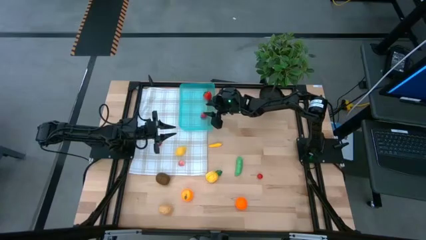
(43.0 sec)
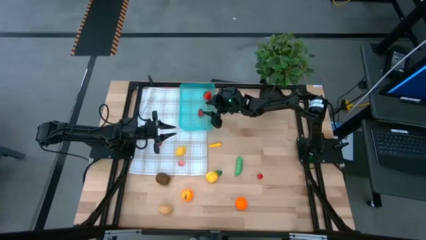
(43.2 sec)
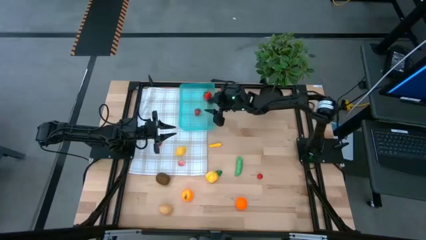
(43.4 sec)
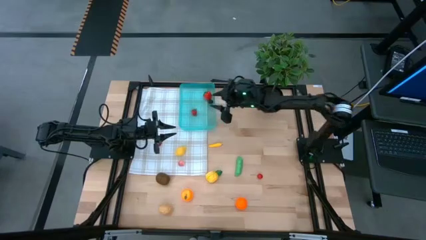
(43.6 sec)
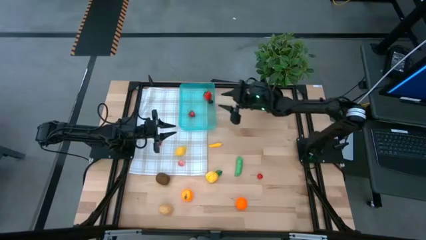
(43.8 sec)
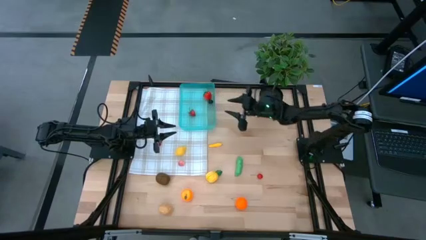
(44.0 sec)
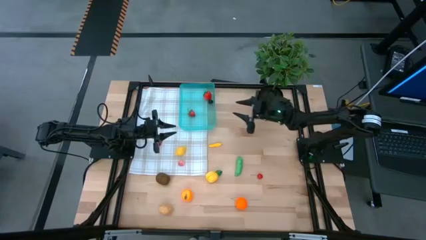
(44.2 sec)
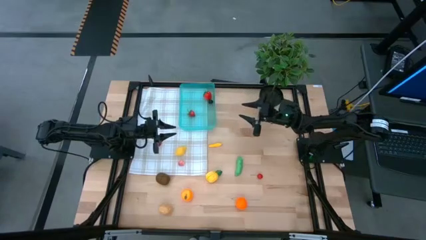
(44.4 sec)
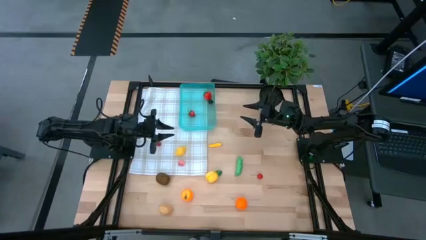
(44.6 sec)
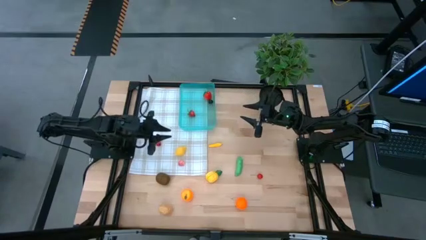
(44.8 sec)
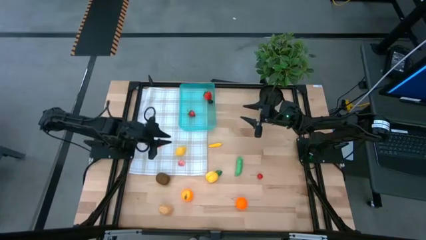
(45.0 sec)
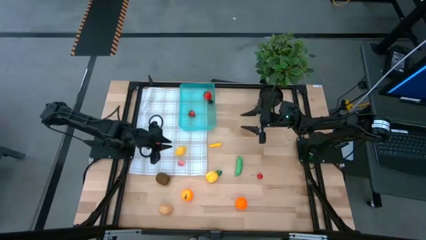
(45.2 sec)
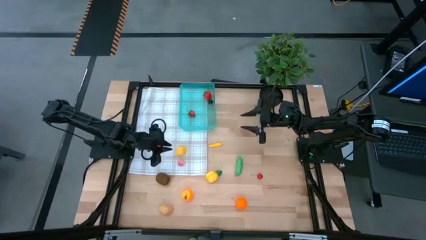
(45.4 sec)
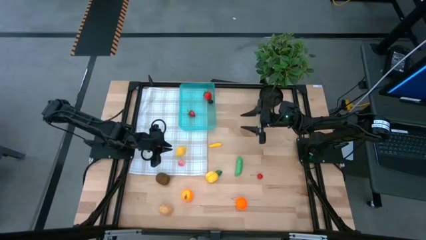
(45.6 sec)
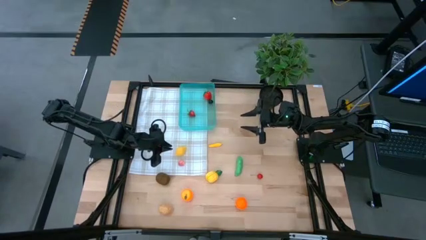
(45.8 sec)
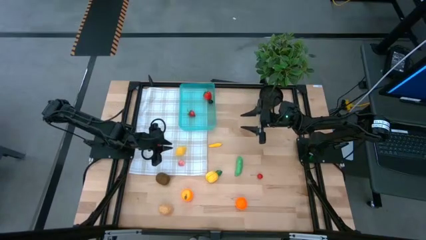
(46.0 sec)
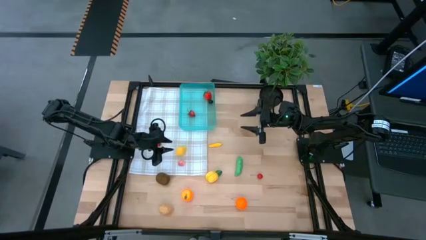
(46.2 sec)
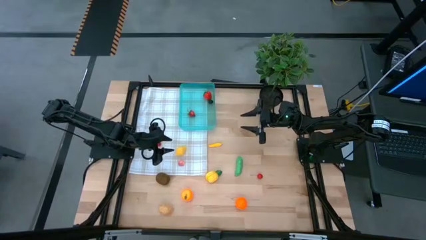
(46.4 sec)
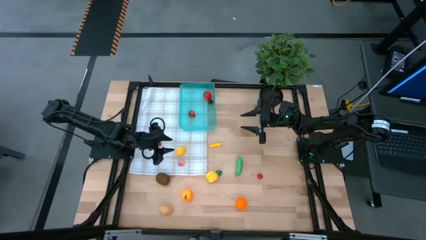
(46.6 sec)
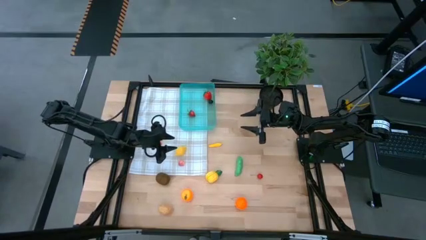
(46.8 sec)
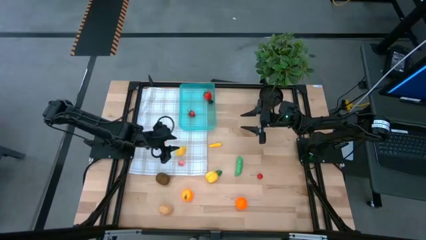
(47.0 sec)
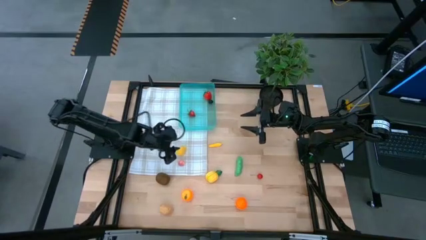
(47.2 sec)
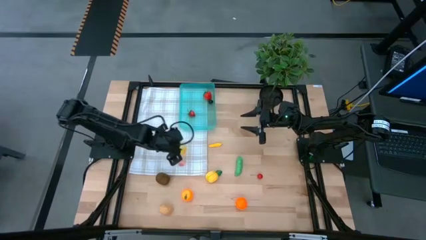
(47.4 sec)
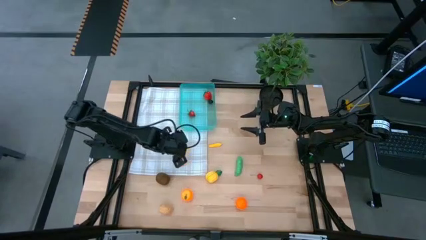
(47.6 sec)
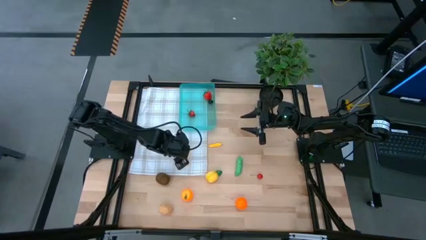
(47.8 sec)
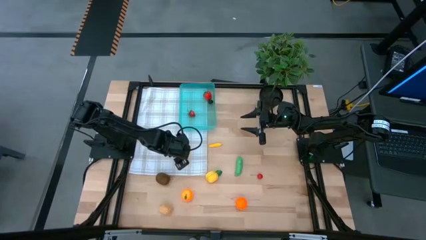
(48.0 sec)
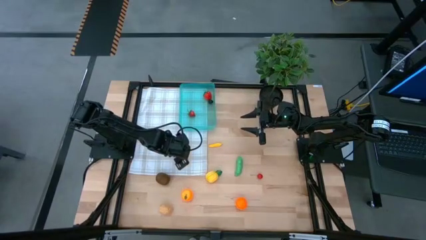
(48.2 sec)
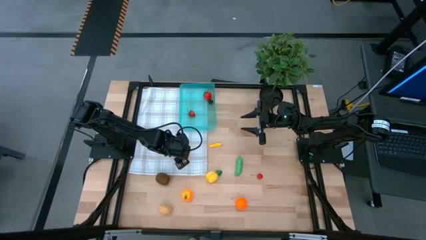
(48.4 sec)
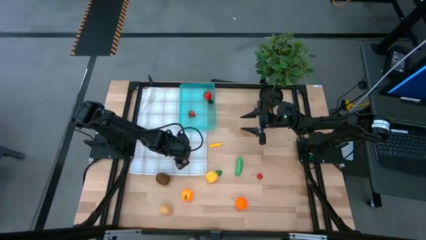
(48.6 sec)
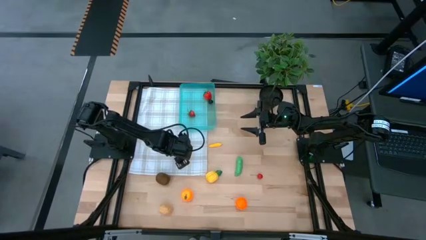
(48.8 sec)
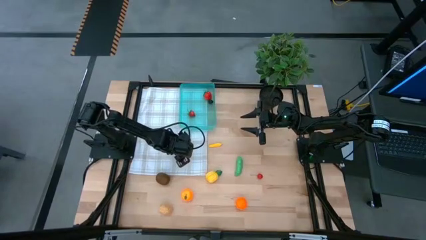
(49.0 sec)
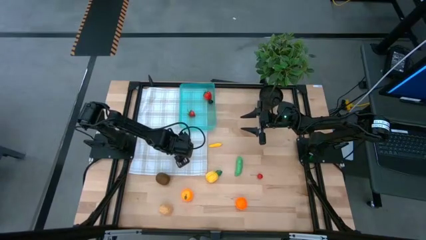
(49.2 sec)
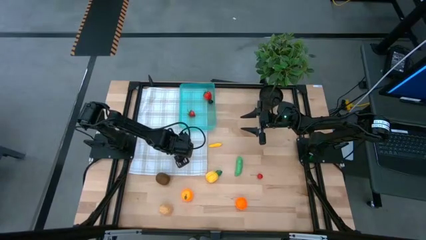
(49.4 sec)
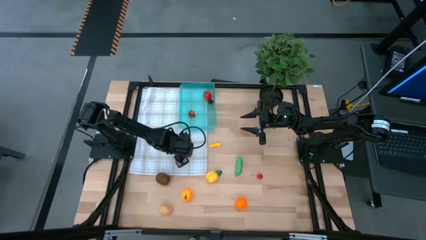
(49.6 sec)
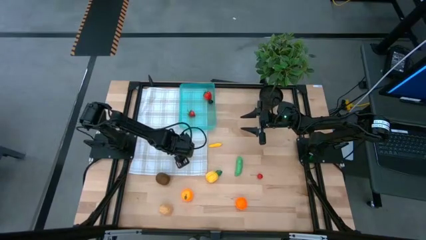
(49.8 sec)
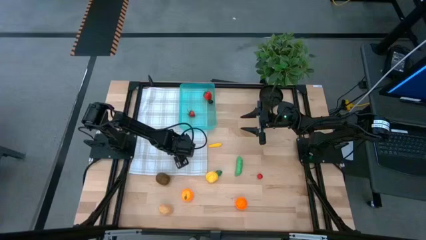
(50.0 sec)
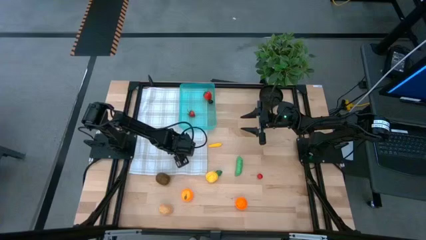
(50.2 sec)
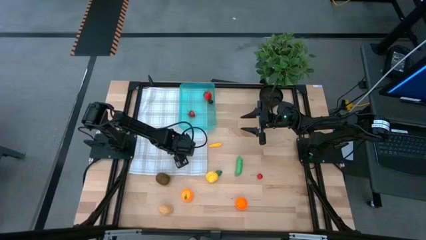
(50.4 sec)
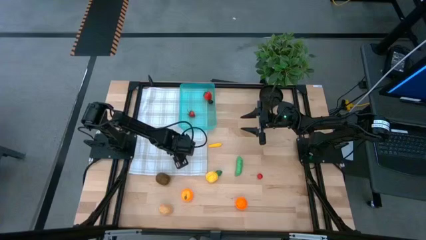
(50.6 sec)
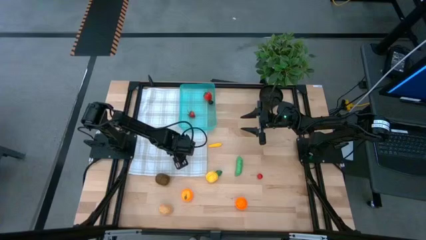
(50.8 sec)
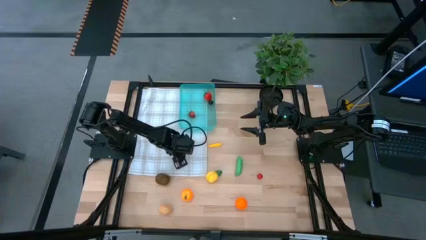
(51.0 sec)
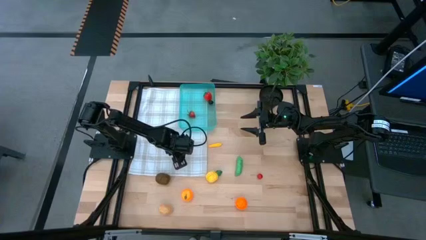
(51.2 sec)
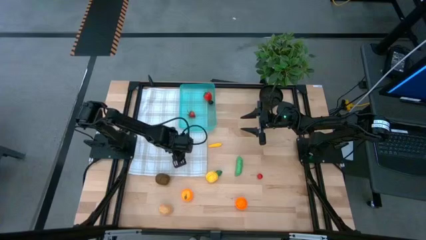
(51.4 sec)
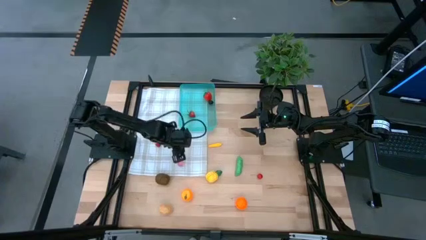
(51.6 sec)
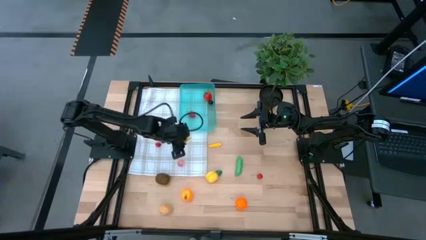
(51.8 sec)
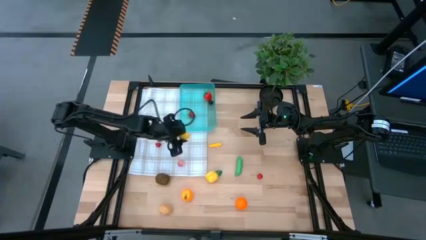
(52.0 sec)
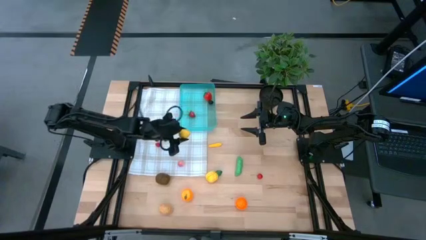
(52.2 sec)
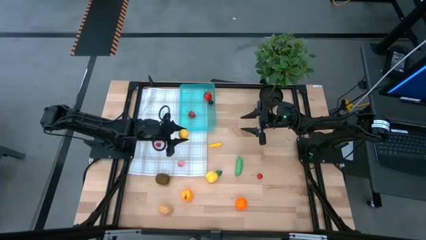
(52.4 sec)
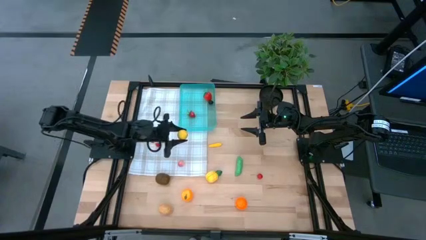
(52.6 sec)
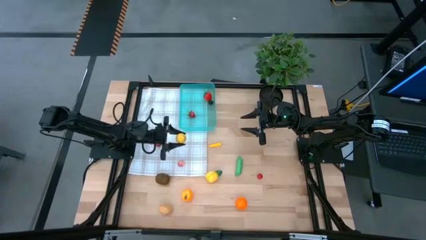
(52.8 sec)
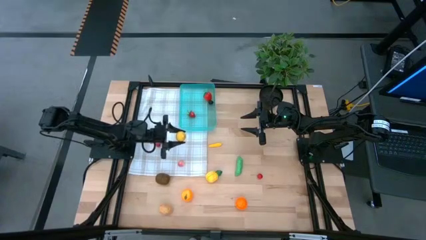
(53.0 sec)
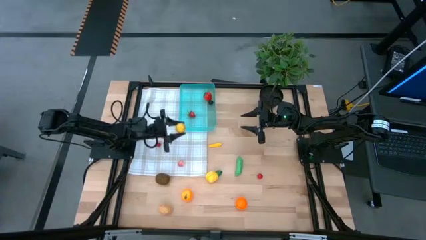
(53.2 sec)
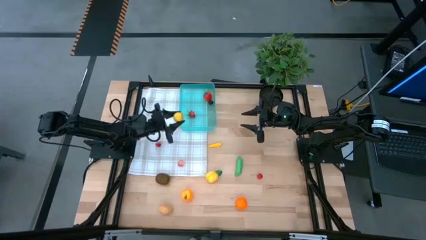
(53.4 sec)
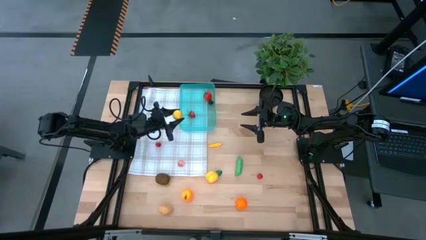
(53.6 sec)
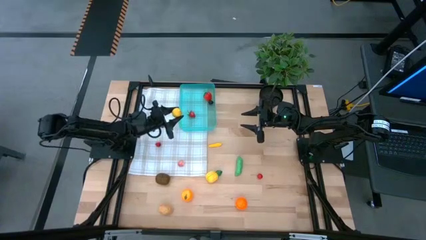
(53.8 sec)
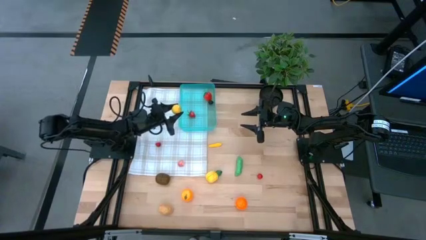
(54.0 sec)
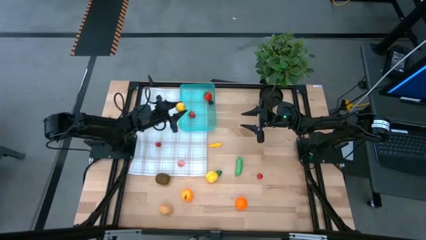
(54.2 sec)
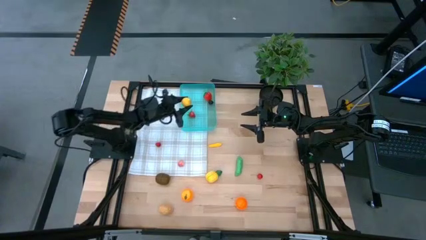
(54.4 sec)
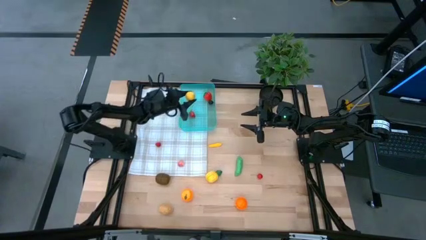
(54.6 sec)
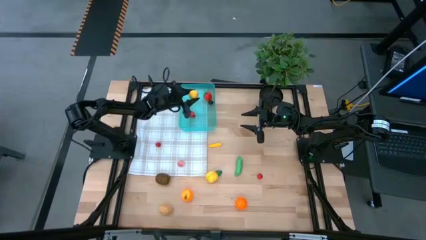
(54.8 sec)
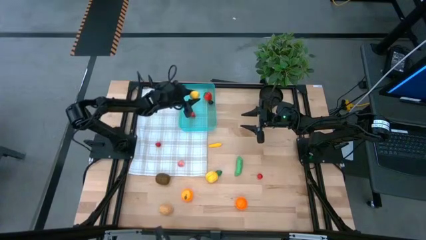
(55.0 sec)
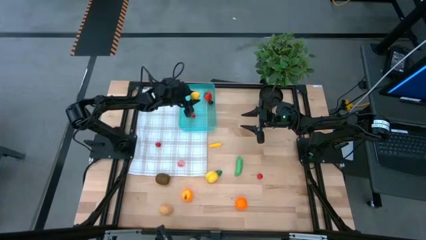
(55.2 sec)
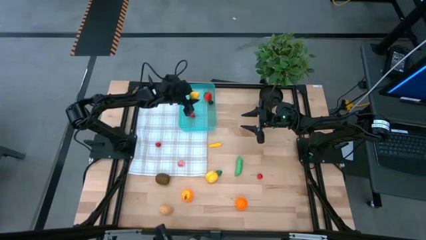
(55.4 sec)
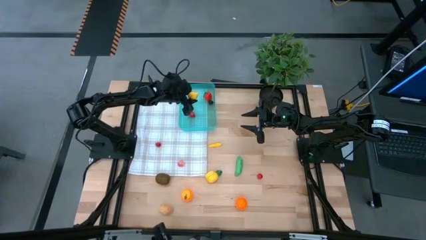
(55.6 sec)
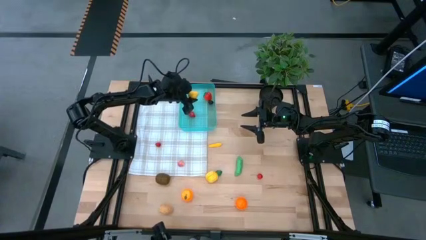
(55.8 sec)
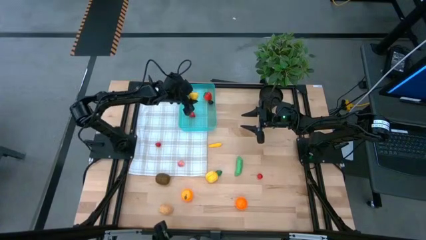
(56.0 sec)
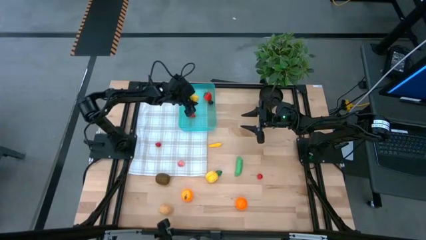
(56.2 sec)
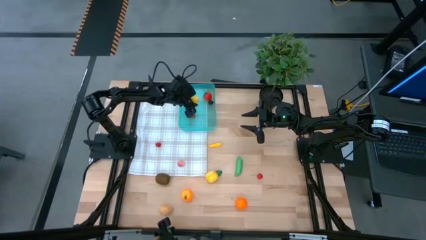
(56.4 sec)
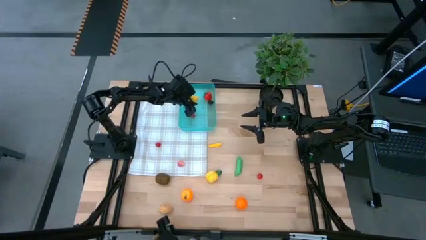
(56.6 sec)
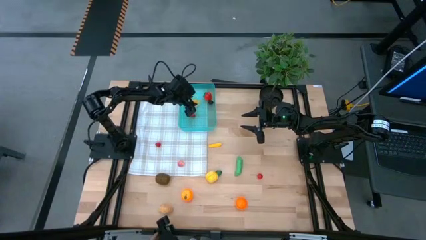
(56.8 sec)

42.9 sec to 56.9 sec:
Task: Pick and placing Produce into tupperware
Put the yellow lemon into the blue bin

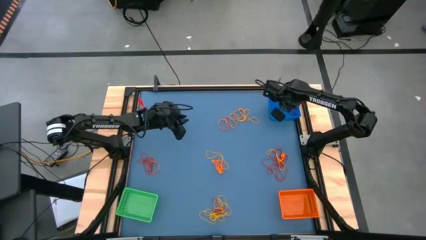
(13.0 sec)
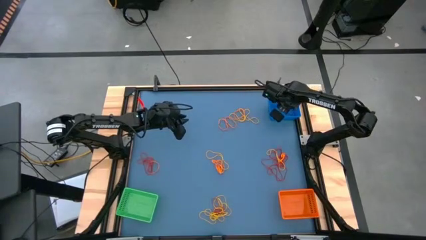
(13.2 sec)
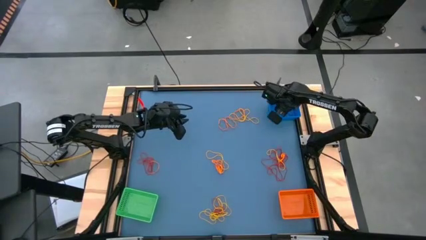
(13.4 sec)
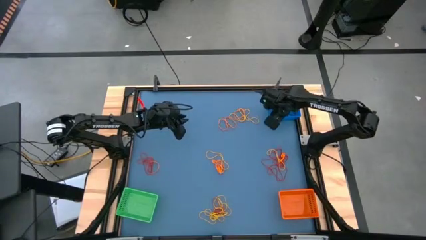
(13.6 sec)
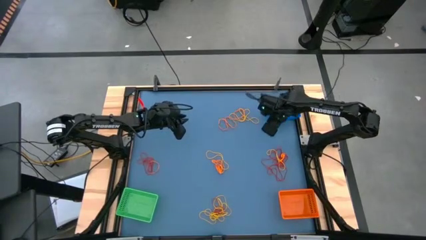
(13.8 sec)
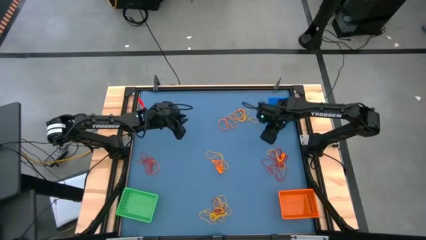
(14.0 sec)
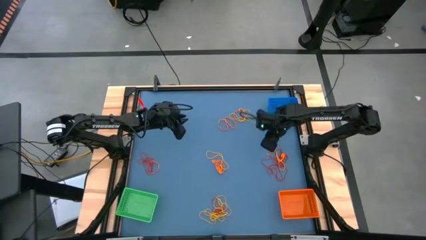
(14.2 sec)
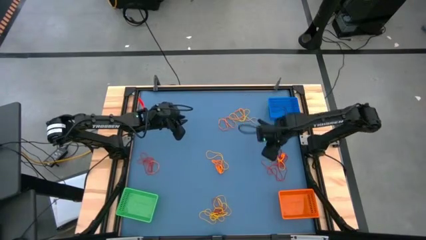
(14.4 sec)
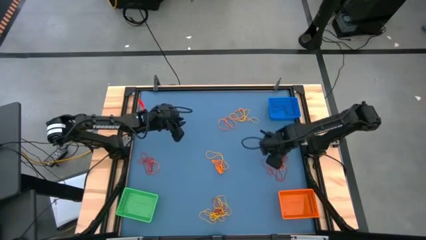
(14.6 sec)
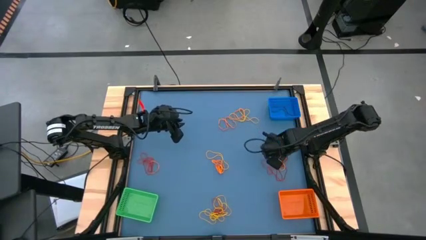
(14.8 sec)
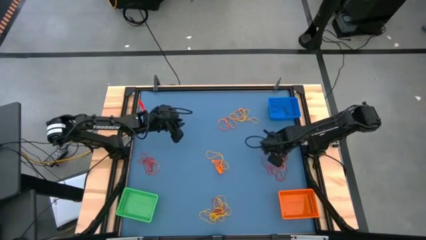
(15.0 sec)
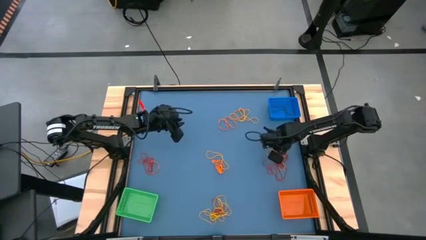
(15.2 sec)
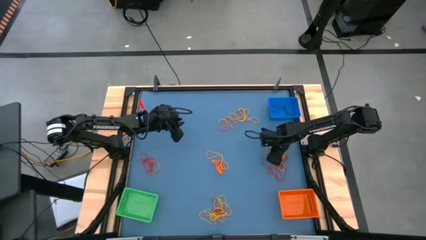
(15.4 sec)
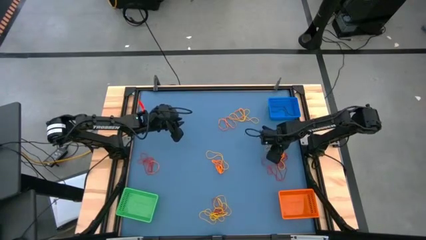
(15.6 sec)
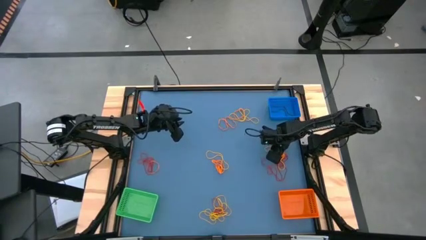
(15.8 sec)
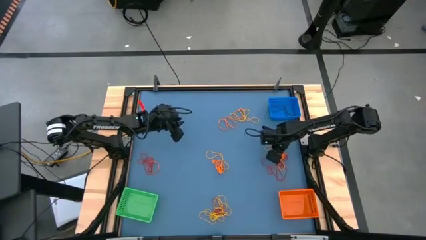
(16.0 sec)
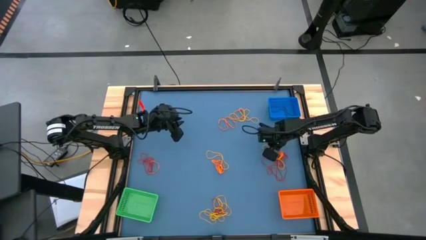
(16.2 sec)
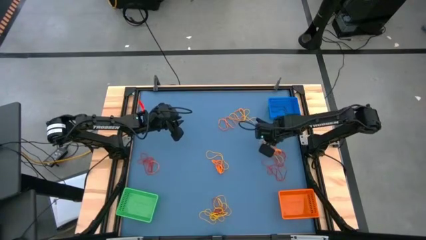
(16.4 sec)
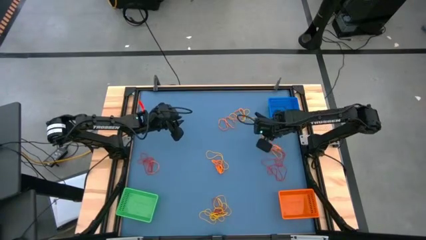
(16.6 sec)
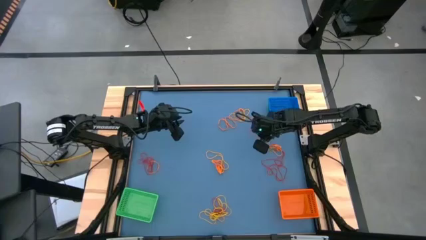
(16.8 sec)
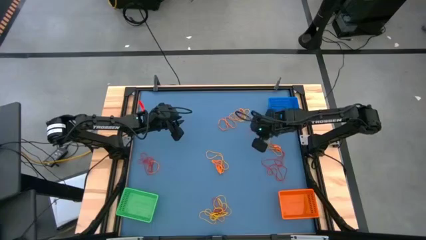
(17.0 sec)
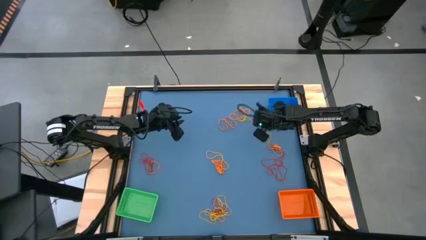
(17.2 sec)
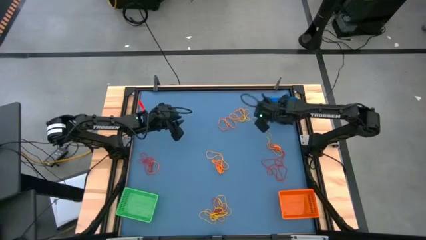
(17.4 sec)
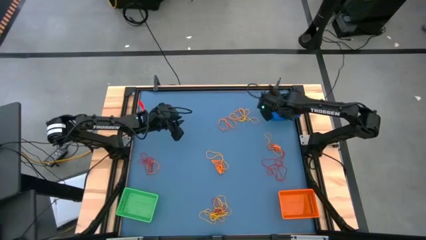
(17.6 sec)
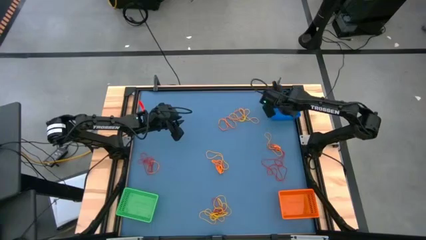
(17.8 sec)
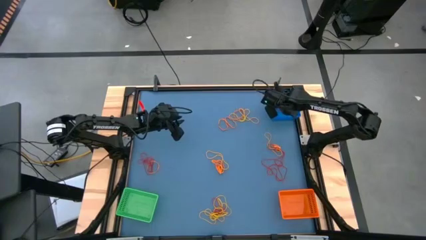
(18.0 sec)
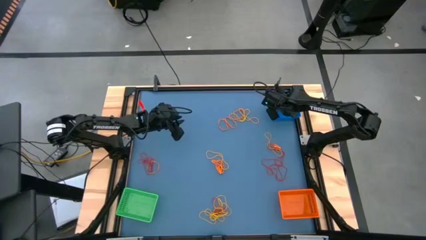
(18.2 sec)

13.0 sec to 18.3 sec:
Task: Sort rubber bands into baskets
Put the red rubber band into the blue bin
